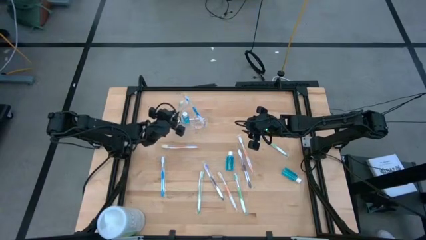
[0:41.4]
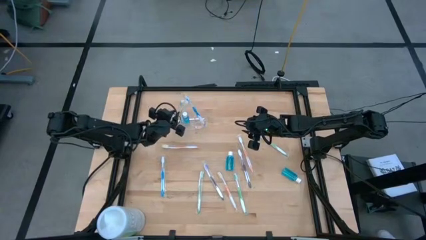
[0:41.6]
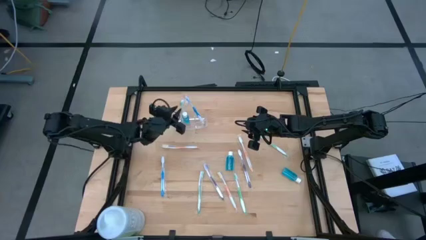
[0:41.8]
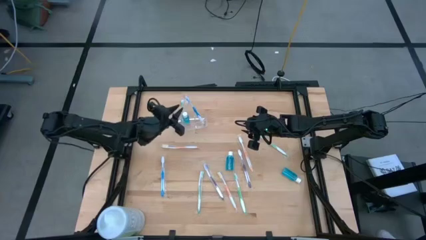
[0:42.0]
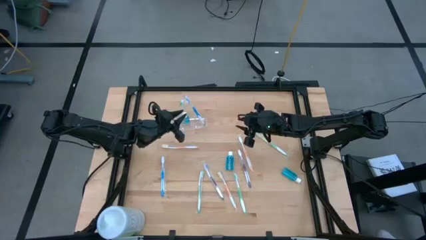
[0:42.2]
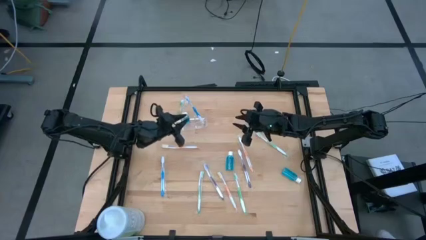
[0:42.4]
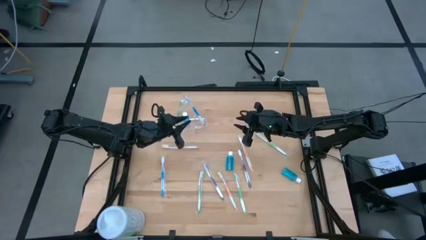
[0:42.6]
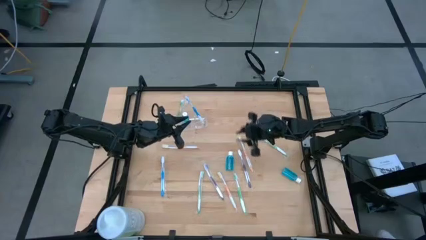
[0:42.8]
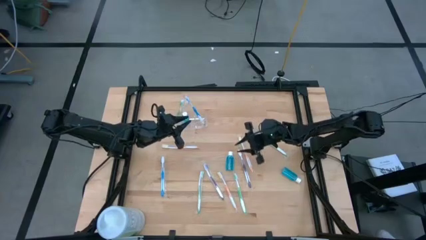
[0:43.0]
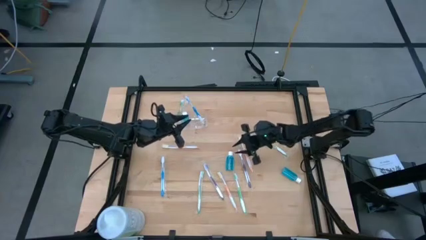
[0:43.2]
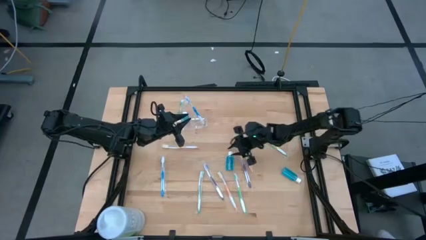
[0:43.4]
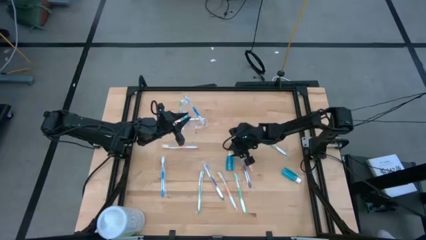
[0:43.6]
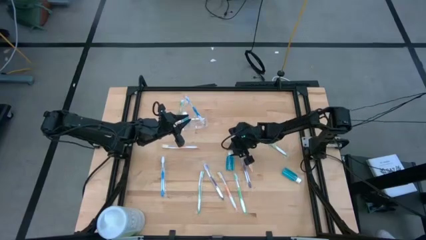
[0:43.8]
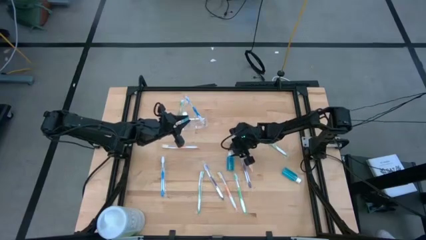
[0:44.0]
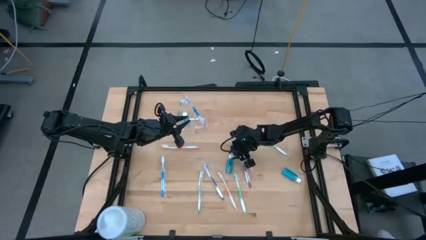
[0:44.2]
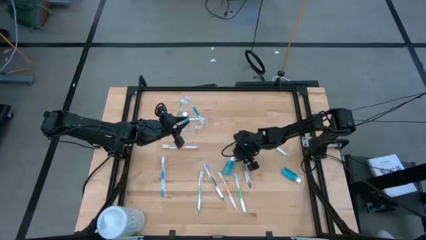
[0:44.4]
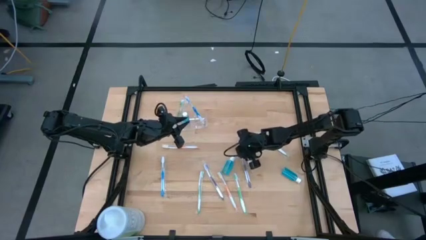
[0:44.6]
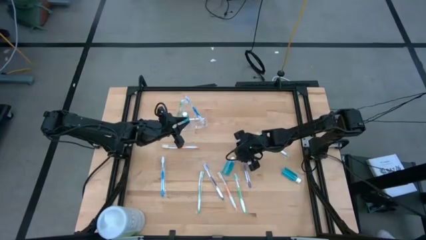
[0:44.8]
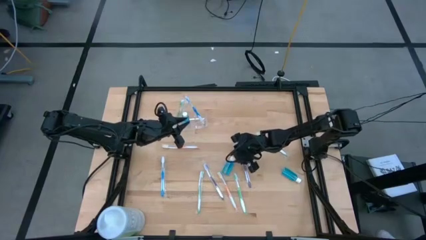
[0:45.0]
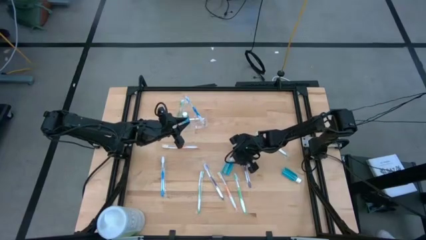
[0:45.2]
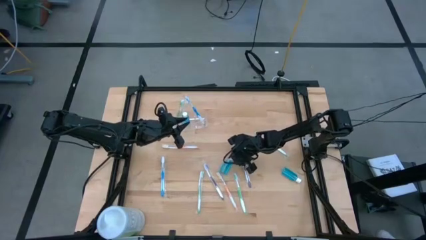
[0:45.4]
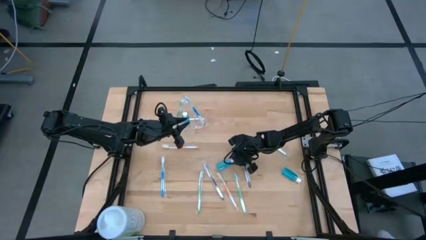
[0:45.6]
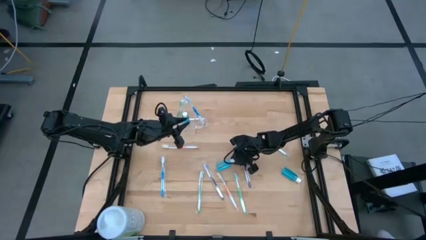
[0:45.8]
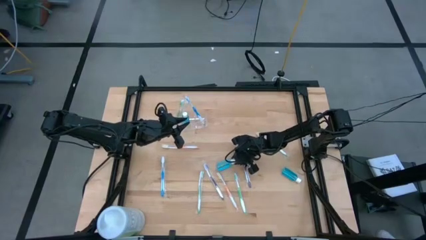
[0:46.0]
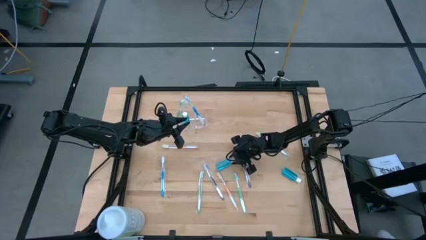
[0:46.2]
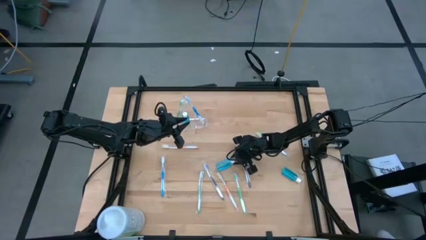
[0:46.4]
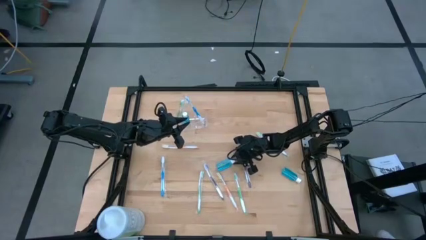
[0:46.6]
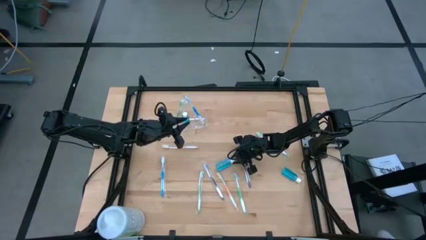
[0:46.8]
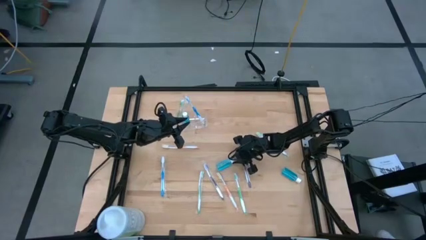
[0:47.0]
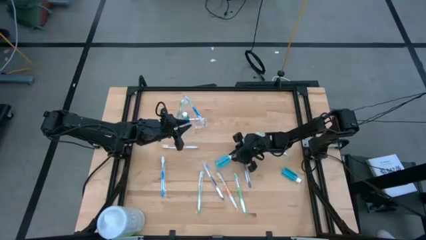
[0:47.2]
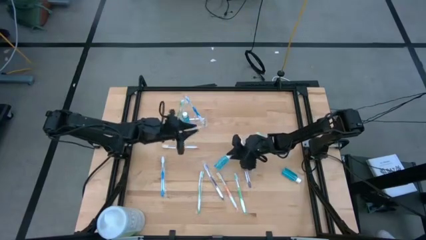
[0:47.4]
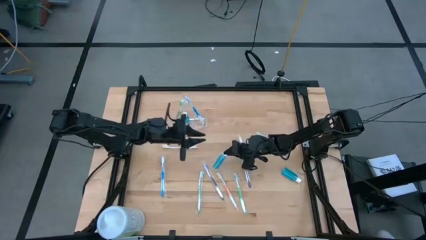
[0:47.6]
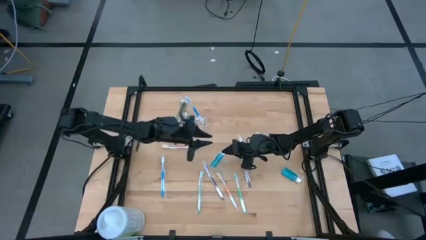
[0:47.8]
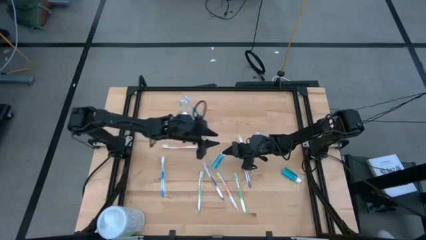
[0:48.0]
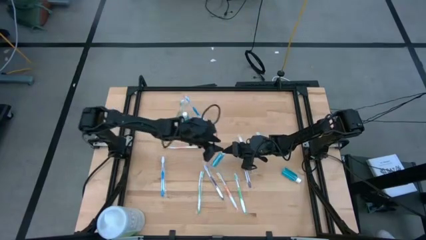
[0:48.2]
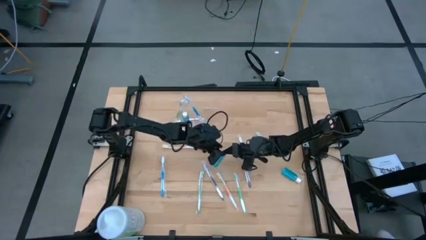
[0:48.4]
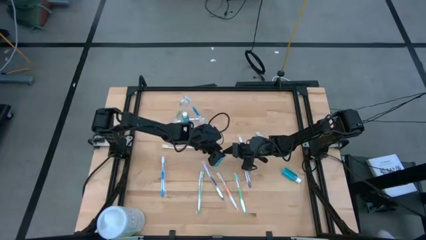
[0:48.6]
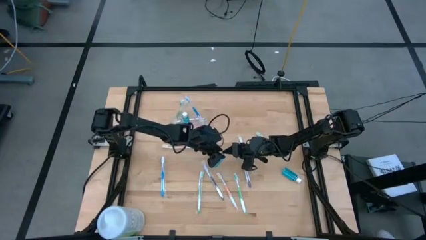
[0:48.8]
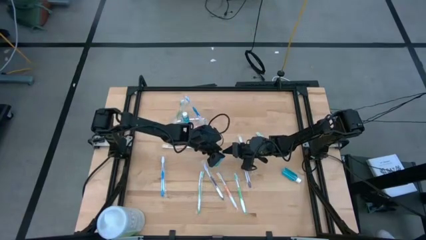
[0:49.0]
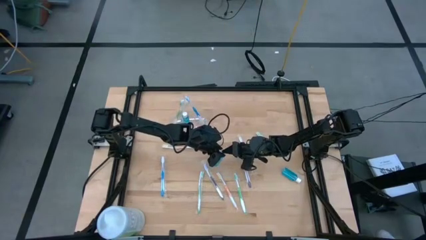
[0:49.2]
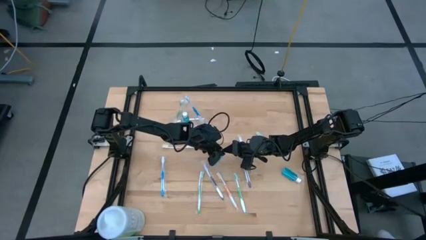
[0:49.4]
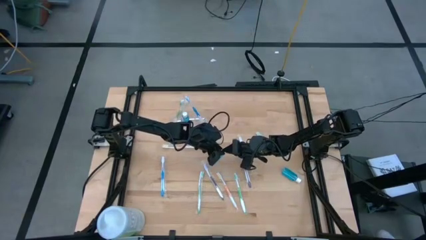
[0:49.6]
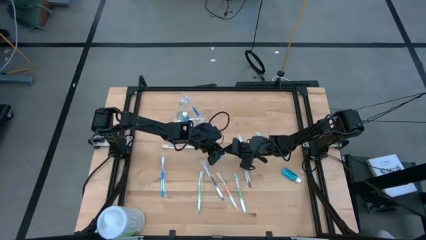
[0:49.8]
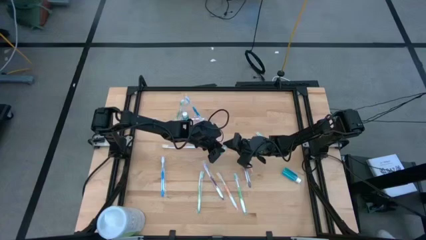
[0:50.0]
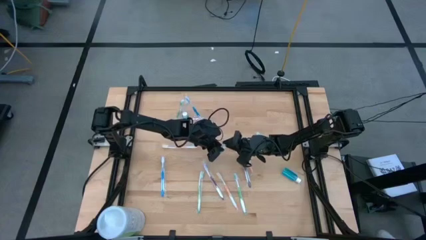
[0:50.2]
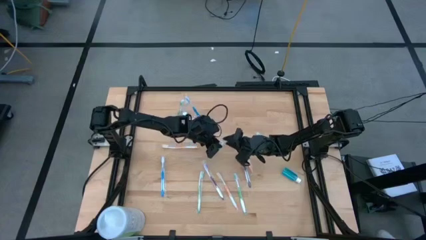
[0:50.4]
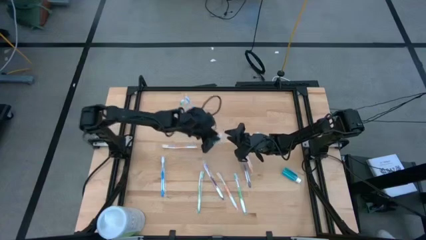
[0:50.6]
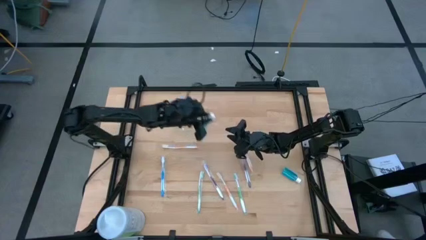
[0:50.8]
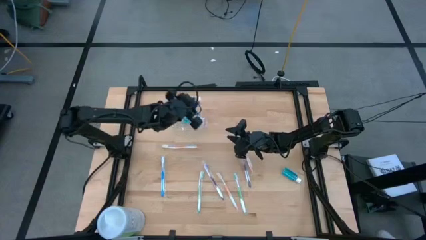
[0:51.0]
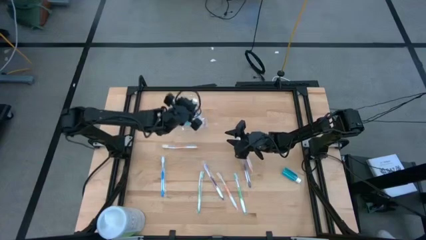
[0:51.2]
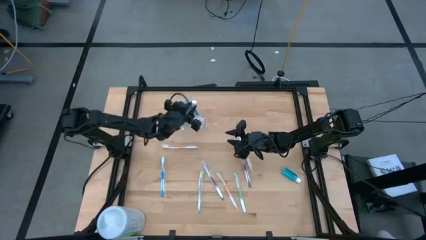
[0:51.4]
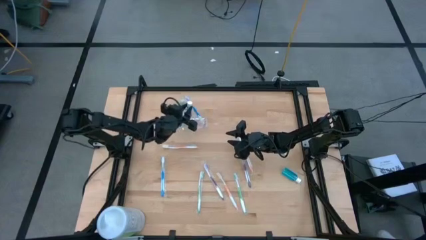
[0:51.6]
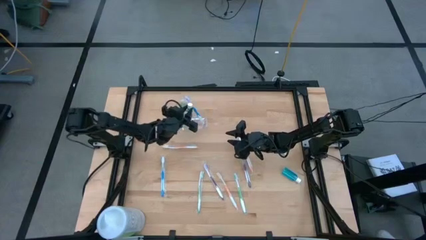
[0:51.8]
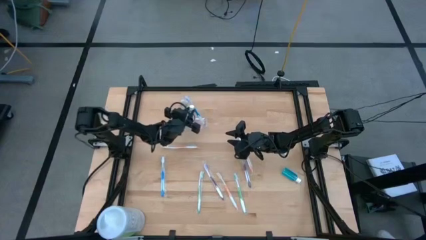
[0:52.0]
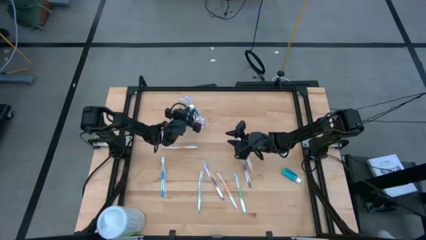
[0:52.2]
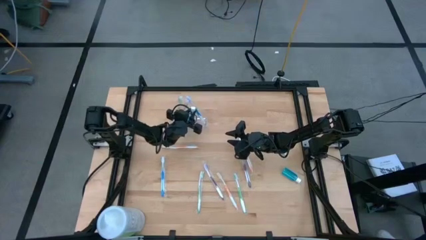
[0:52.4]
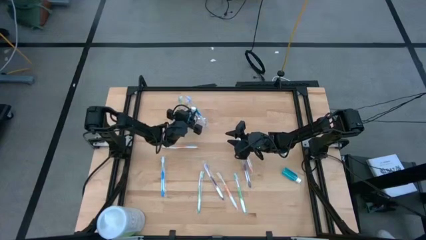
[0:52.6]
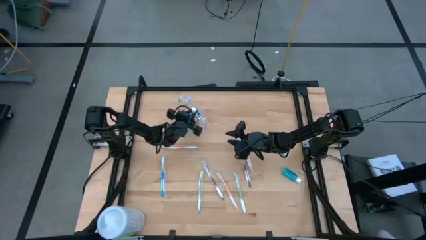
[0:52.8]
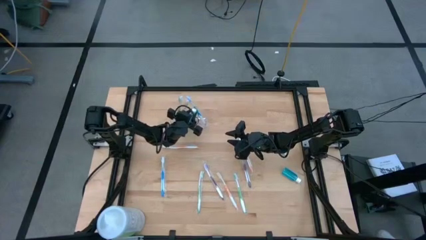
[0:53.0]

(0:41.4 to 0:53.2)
Task: Pick & Place toothbrushing station
Put the blue mouthwash into the transparent organizer

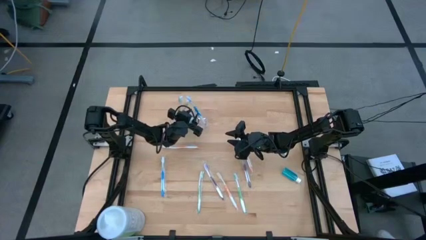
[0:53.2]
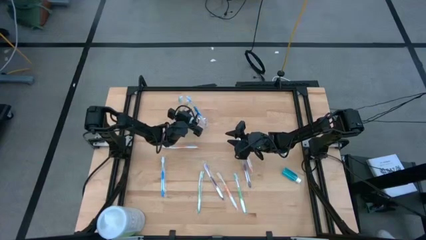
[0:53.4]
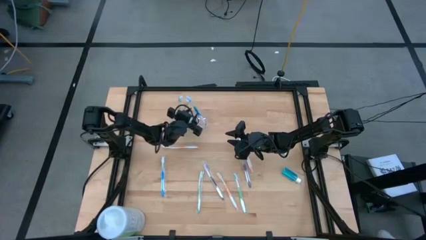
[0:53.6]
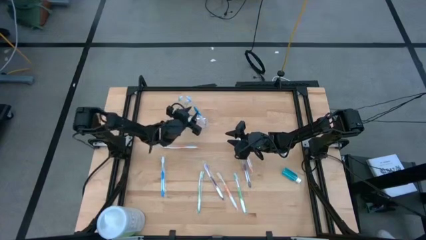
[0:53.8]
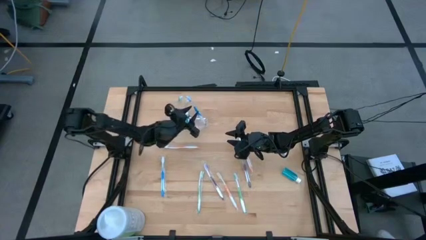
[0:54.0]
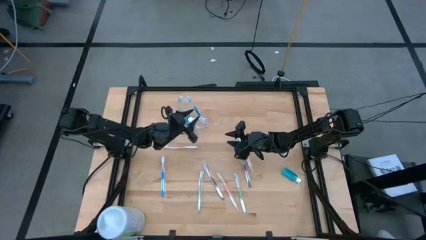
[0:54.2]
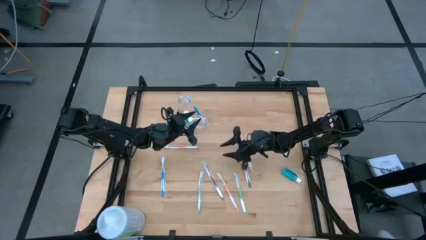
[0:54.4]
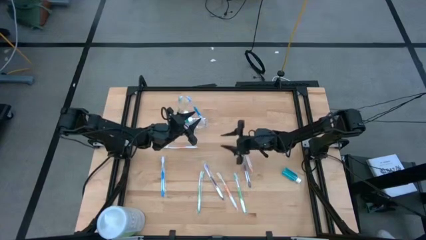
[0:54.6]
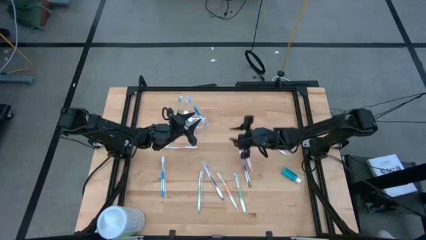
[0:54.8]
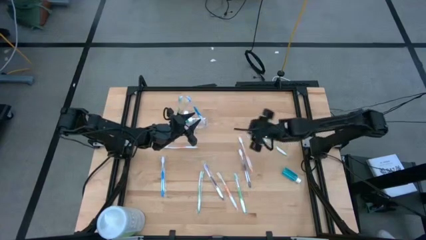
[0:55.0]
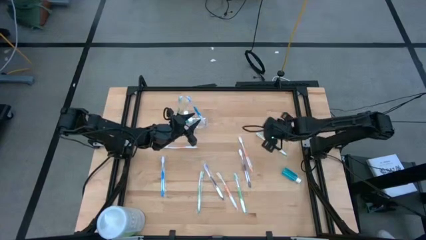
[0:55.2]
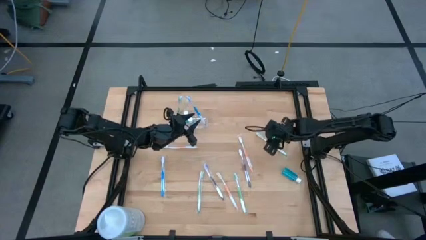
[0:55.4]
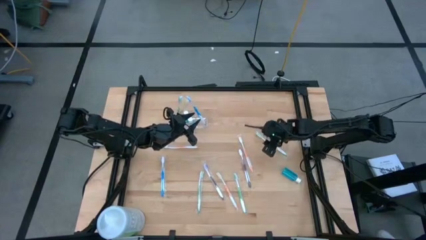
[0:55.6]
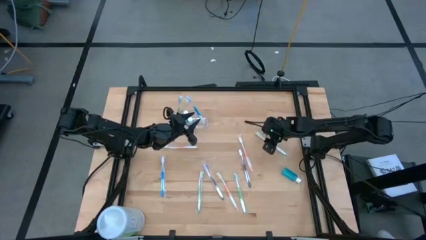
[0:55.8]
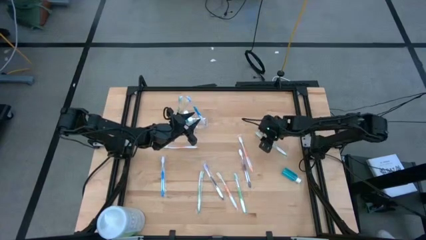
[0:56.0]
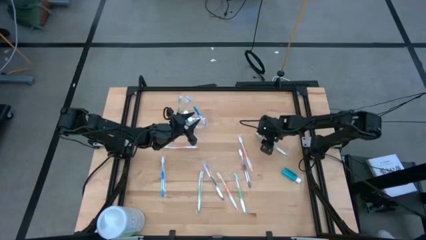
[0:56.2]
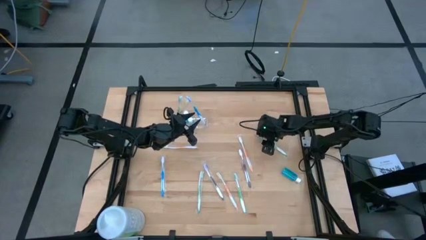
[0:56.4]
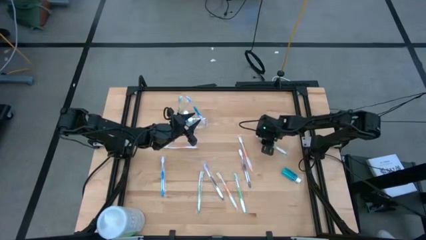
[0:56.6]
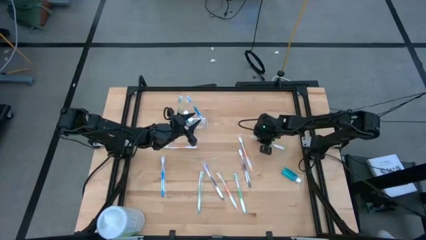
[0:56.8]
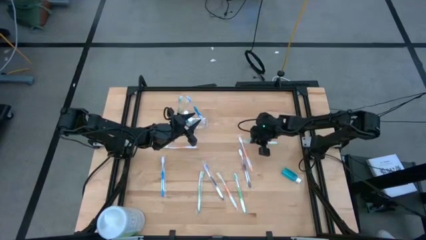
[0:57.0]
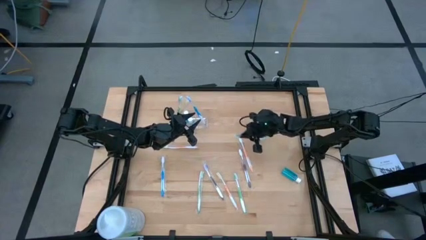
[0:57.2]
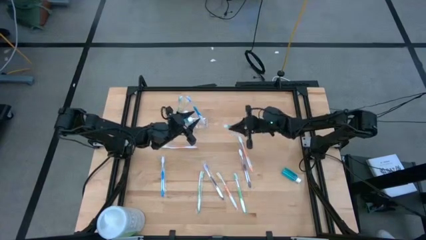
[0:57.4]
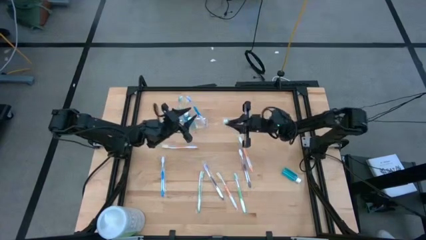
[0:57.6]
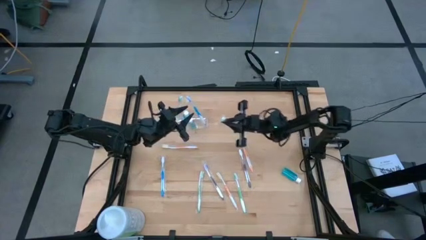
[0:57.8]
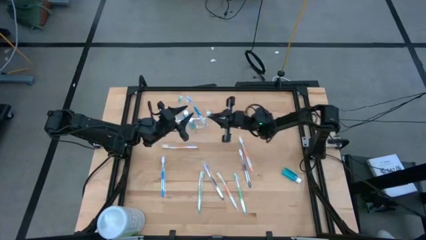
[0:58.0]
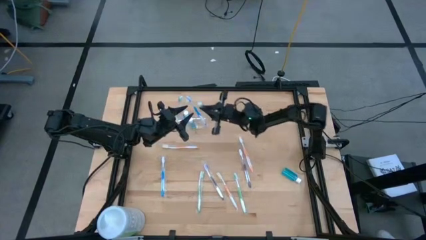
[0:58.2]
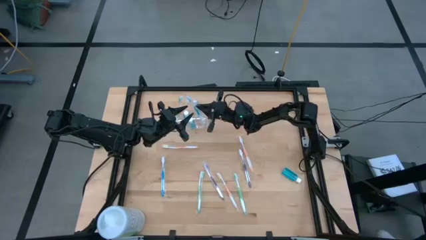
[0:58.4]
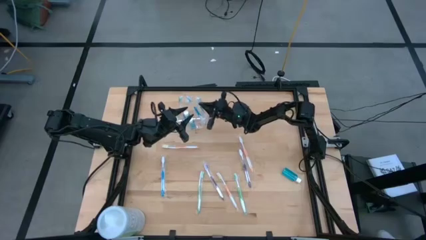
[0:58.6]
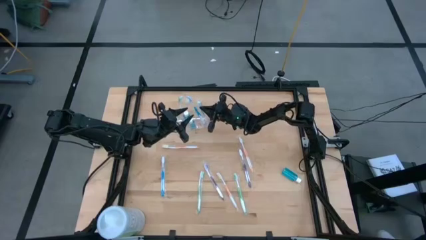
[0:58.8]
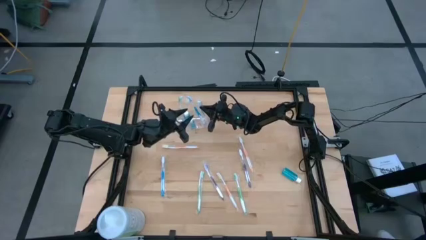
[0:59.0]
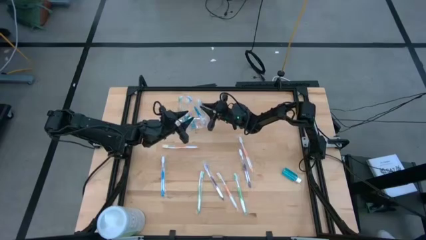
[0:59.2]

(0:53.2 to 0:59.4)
Put the green toothbrush into the transparent organizer
